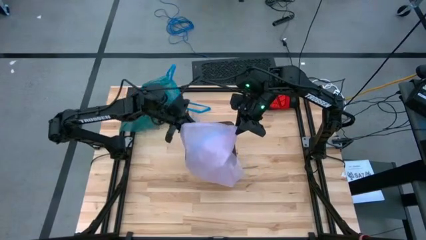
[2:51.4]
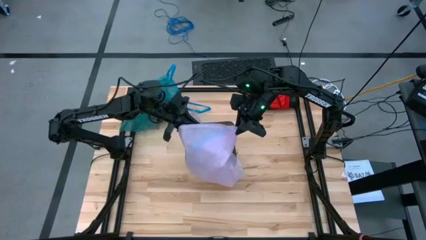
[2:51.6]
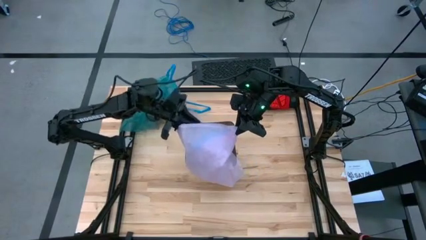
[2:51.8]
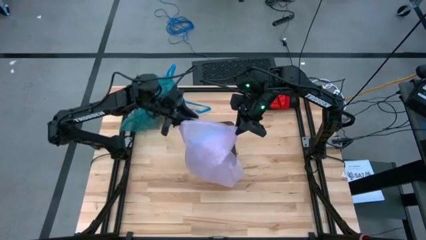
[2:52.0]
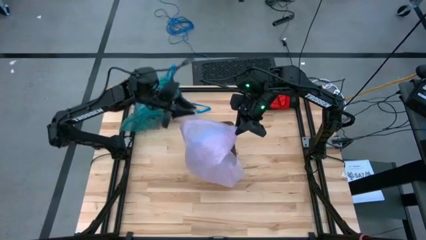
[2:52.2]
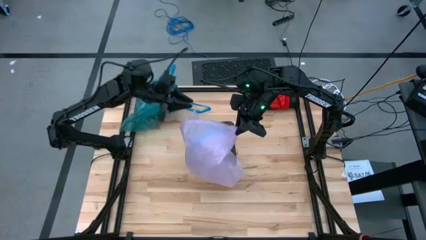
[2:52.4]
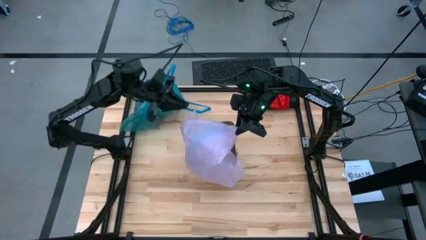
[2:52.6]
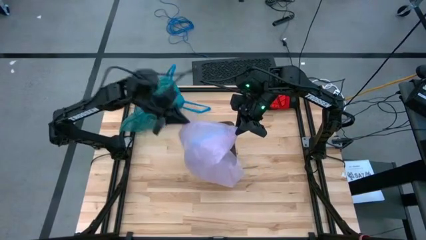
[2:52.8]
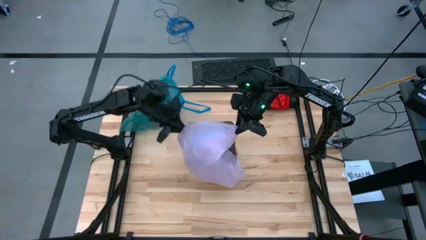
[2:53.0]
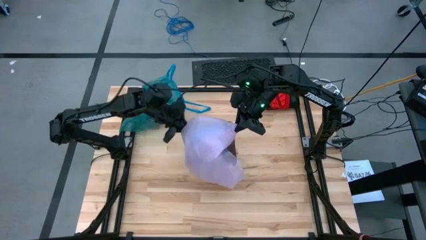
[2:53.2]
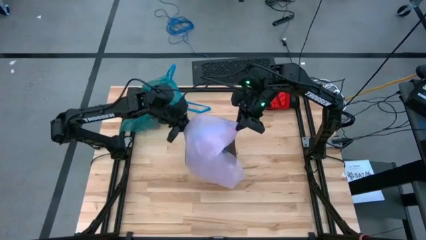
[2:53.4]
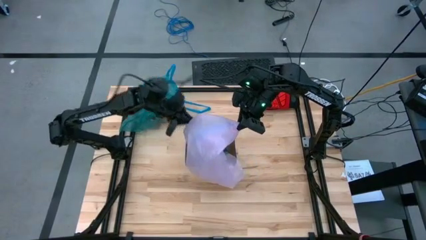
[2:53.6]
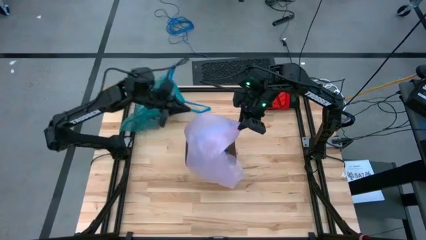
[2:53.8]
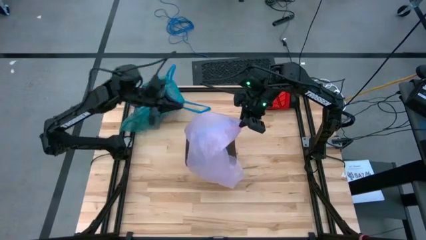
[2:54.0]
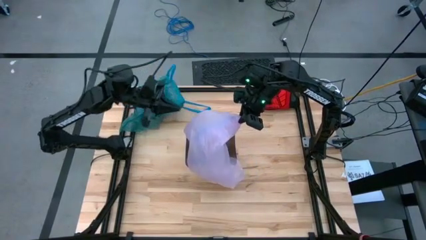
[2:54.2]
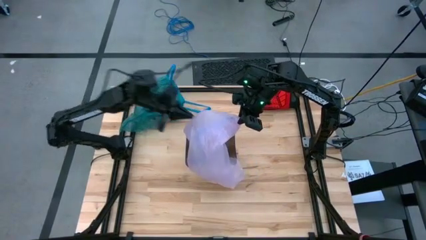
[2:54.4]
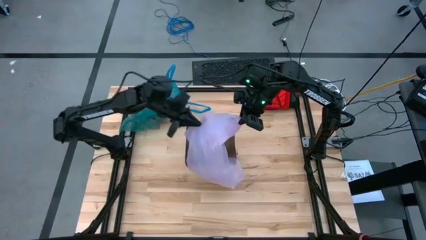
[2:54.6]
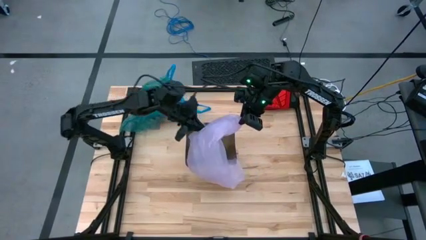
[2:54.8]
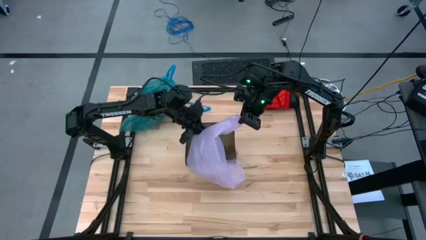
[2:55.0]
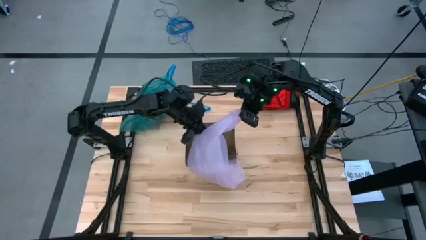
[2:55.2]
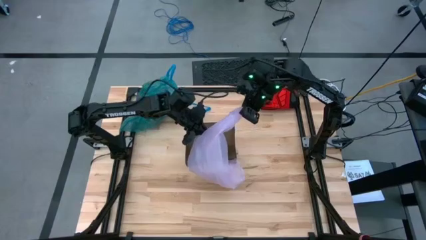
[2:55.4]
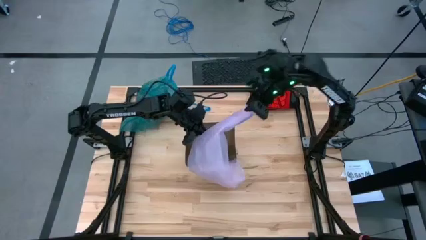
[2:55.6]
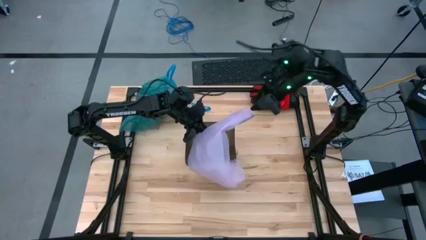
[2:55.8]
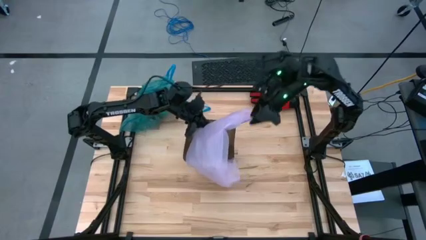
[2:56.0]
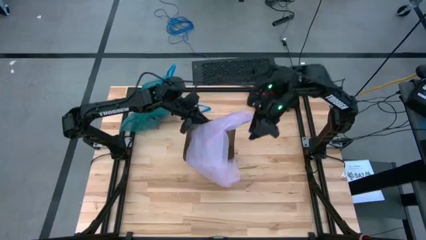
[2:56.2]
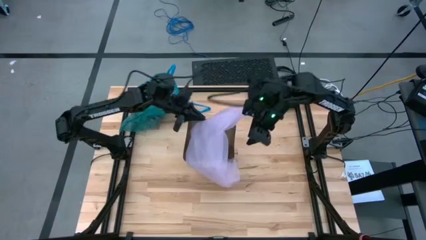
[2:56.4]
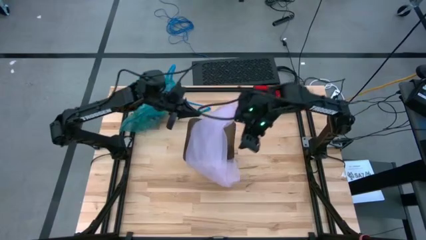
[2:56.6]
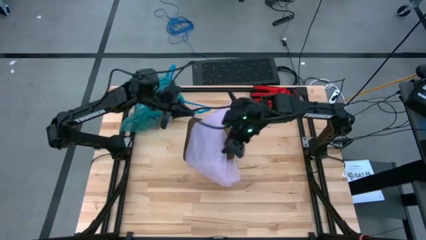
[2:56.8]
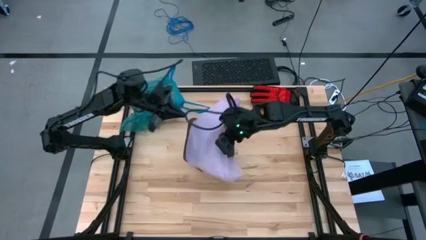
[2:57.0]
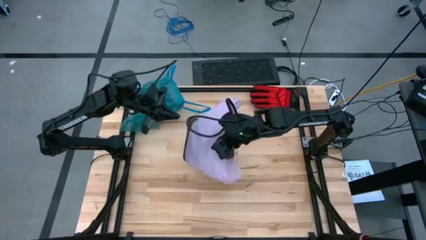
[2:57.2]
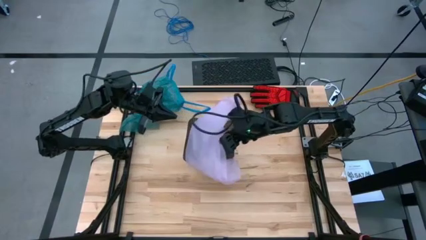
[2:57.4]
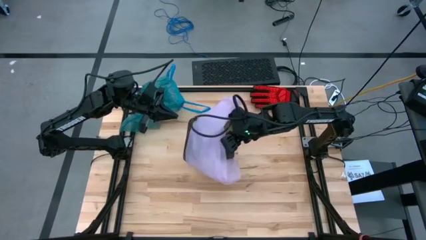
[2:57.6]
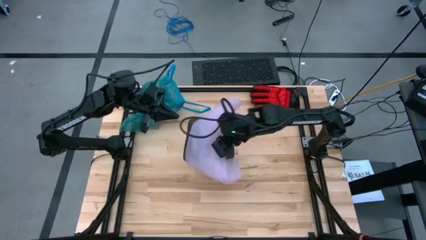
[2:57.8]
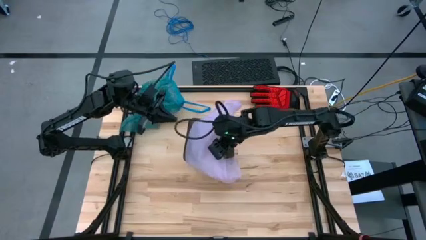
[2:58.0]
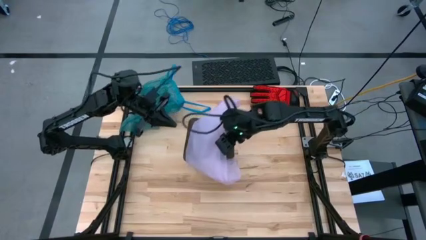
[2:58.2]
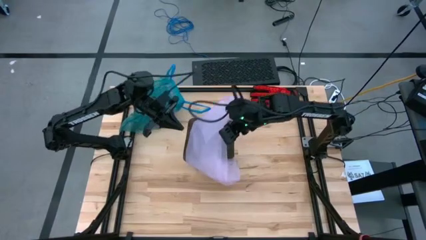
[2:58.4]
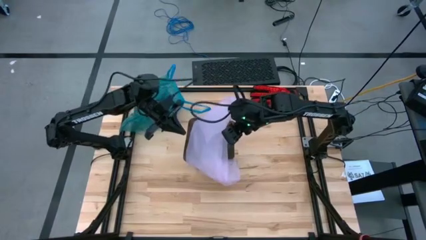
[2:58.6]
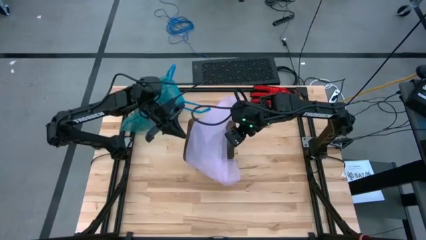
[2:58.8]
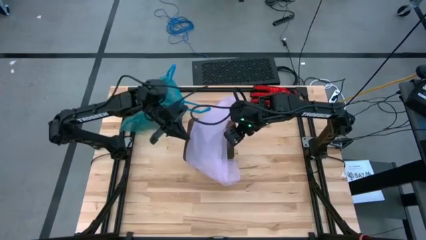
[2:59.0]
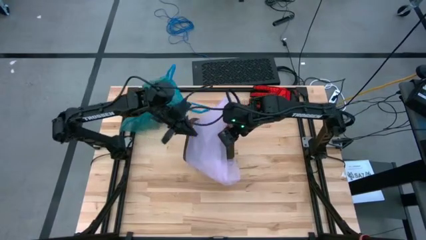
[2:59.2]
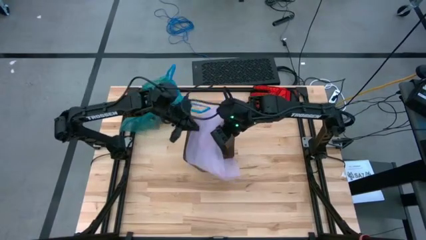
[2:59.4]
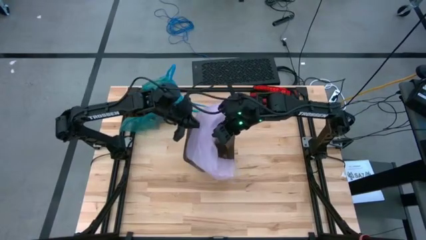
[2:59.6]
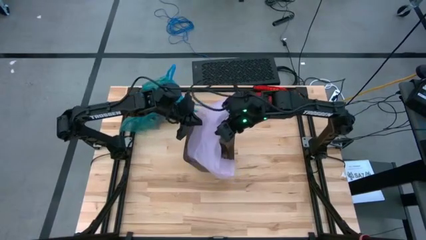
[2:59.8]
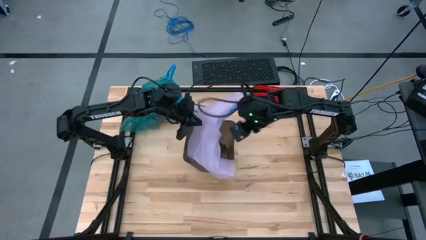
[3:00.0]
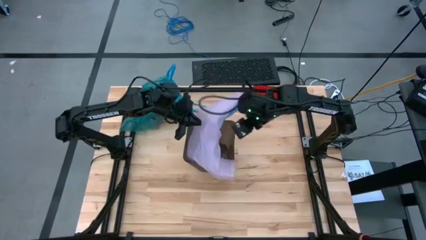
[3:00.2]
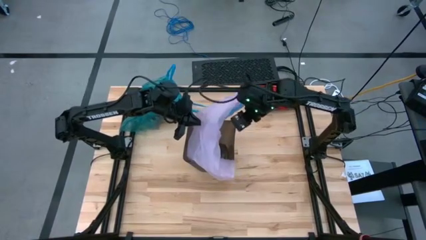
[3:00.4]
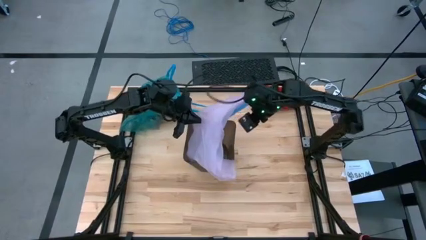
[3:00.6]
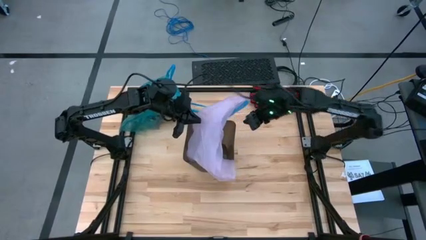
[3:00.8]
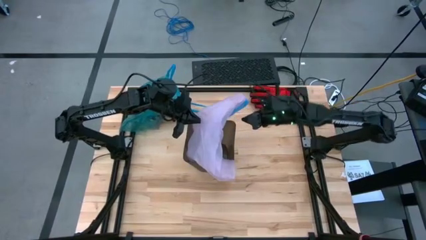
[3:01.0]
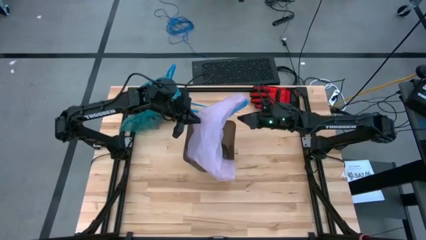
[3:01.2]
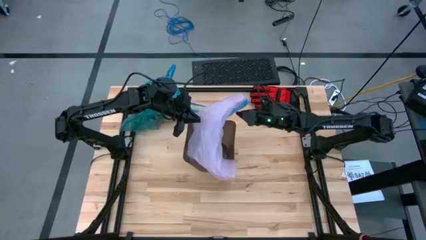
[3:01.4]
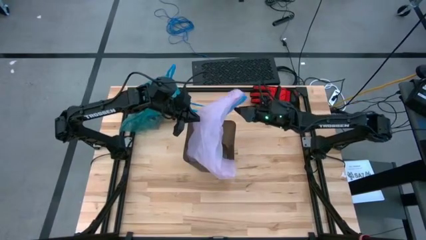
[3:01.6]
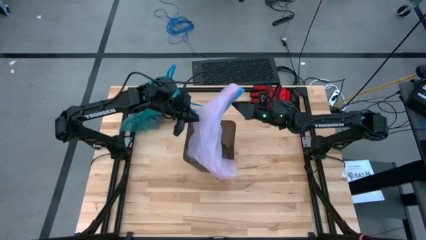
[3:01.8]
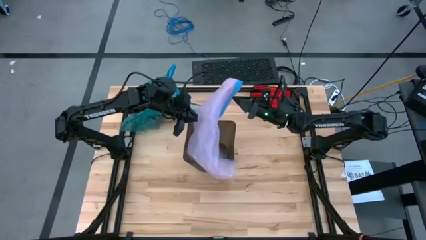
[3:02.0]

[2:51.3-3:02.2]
Task: place trash/remove bag and relplace
Insert a new pink trash bag into the black trash bin

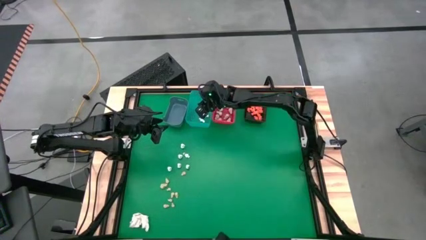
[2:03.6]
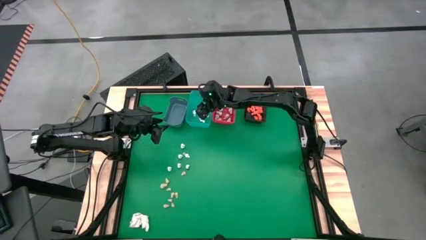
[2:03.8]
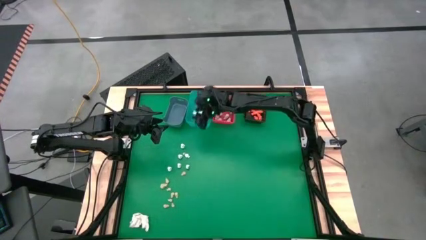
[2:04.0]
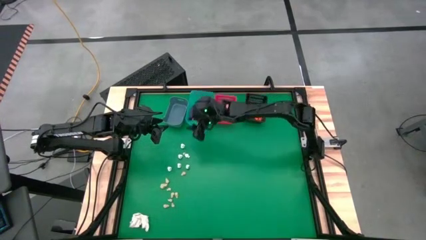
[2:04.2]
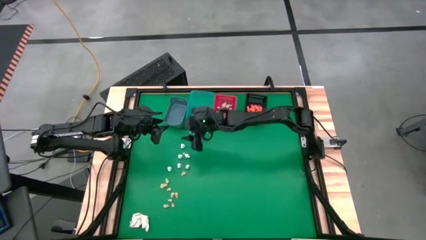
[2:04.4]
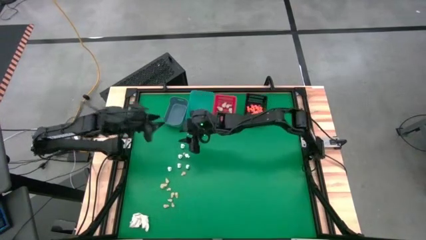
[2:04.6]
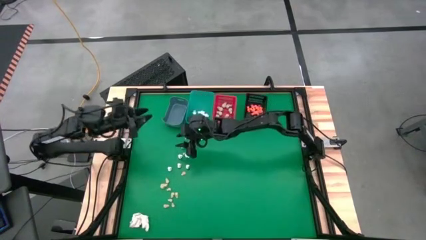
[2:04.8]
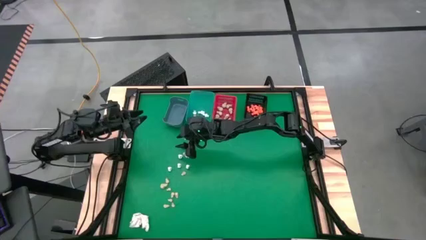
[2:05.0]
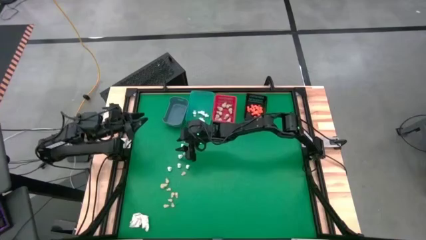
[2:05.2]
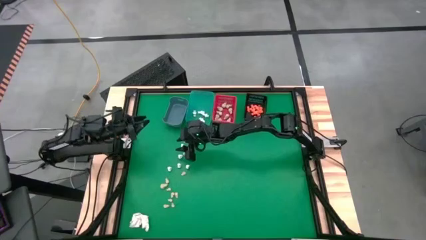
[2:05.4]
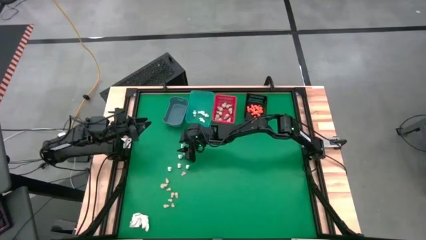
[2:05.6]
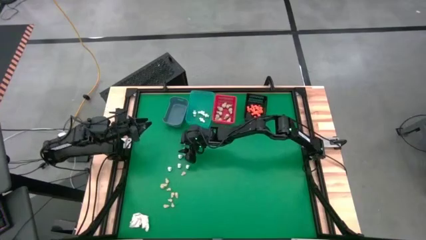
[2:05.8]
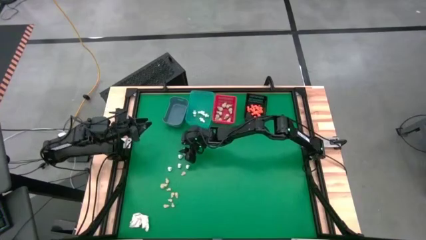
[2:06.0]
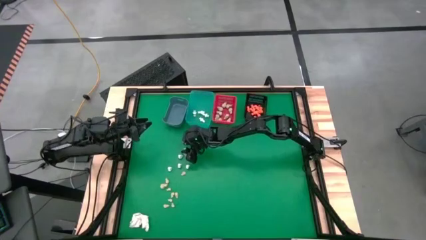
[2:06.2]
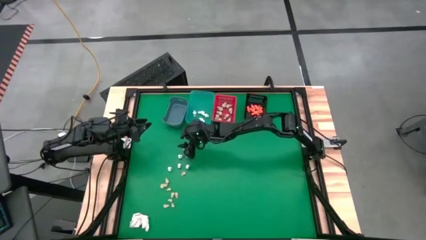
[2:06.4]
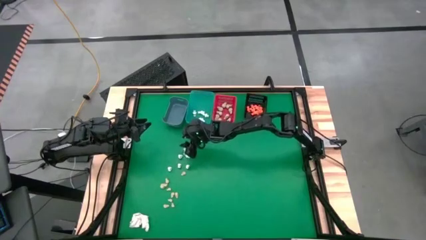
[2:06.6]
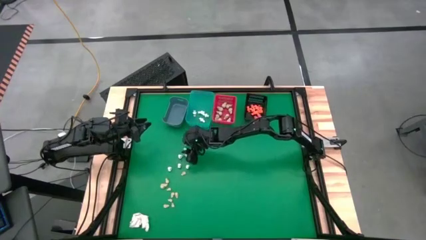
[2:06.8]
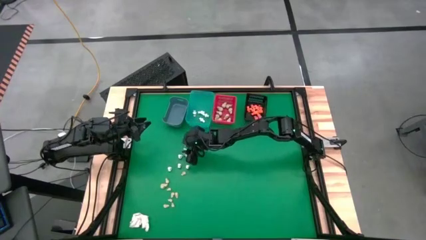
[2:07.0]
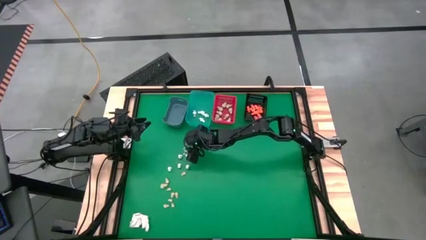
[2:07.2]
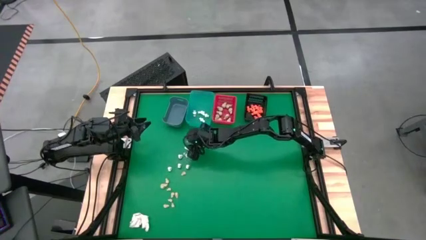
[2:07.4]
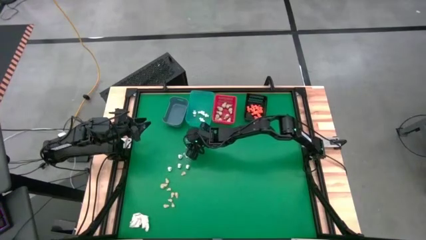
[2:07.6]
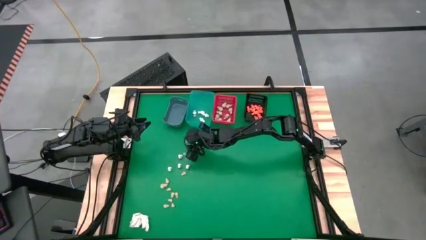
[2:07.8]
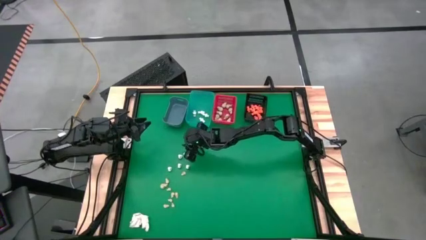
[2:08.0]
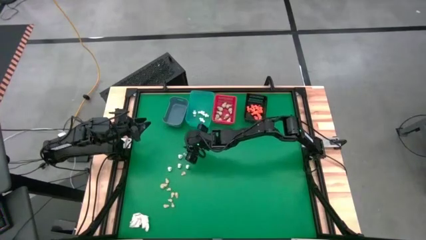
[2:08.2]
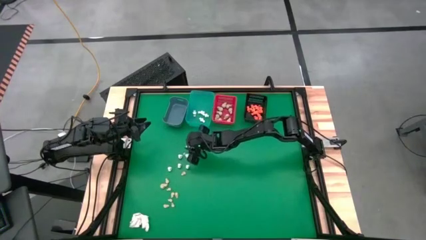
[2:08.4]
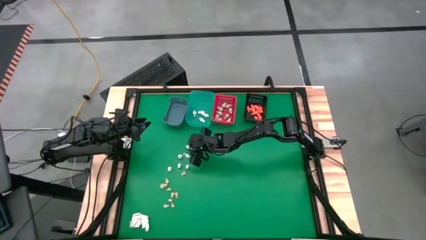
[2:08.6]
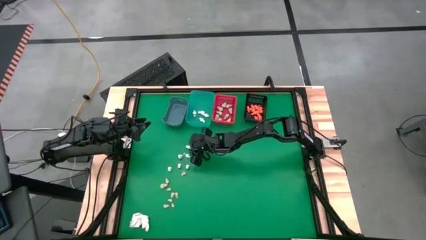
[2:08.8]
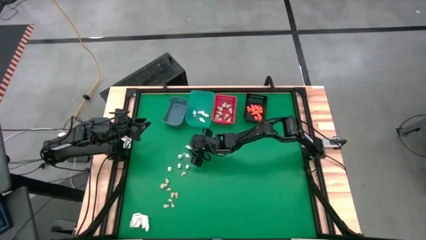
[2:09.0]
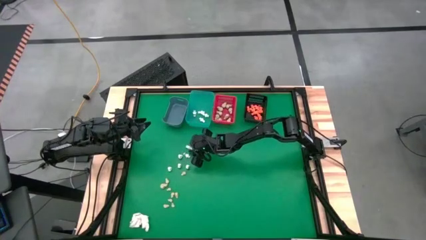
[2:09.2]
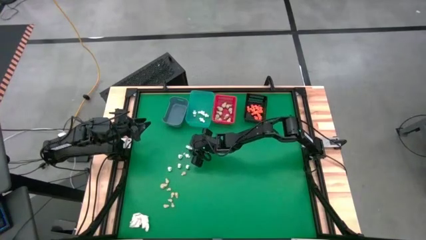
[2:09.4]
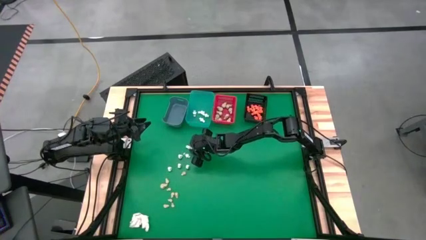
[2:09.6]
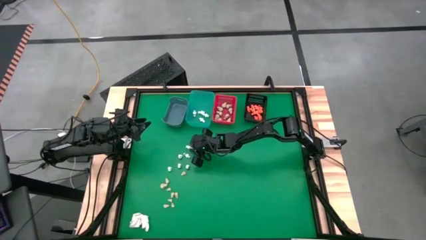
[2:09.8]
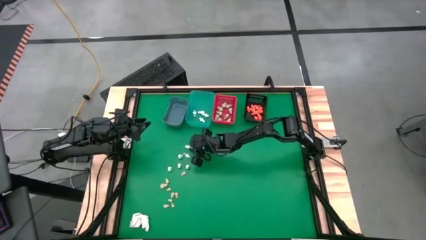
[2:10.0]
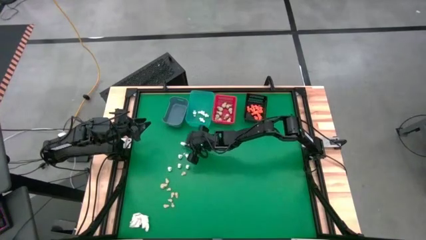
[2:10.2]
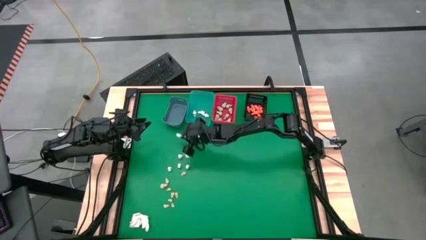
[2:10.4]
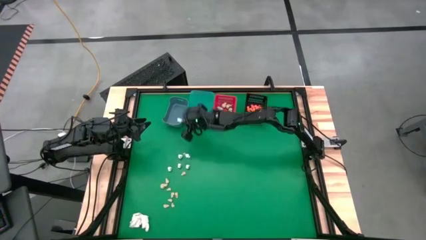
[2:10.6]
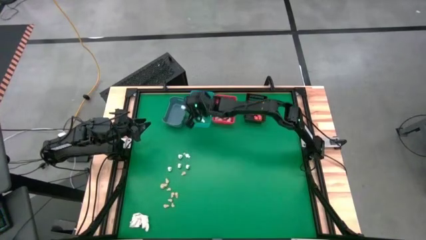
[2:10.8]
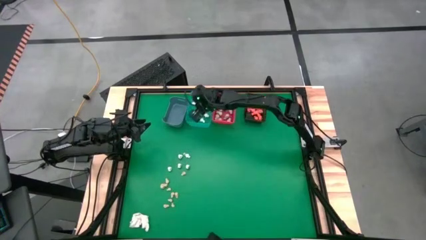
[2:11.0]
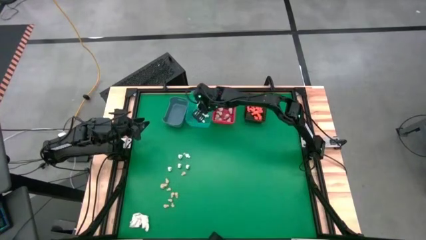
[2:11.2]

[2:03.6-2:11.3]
Task: Sort Halloween decoration
Put the white skeleton toy into the light blue bin
